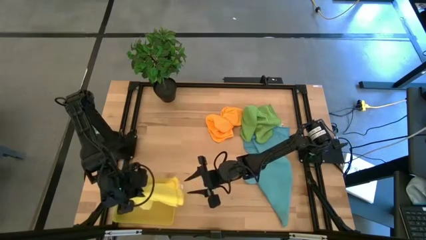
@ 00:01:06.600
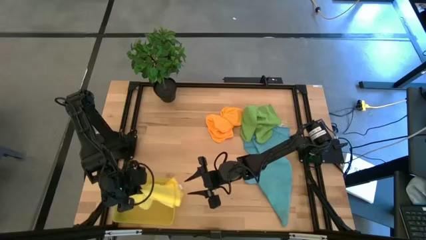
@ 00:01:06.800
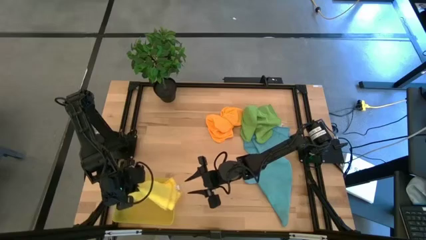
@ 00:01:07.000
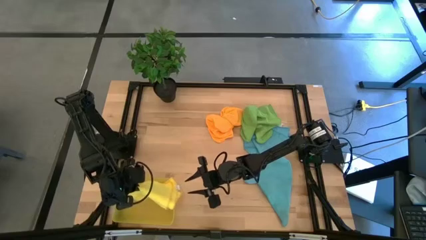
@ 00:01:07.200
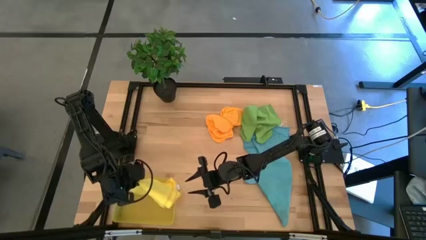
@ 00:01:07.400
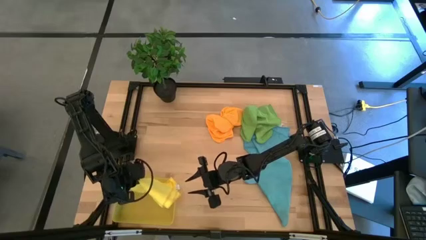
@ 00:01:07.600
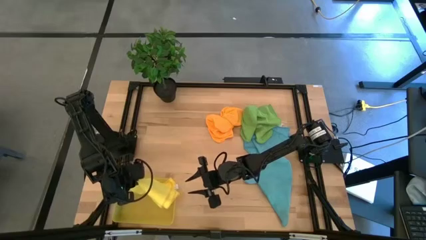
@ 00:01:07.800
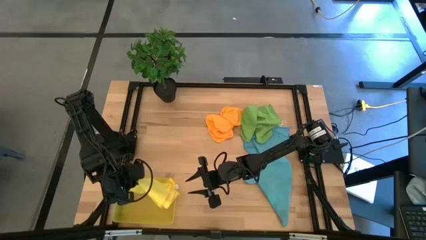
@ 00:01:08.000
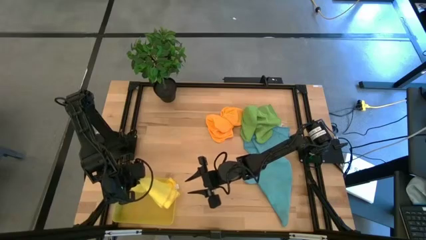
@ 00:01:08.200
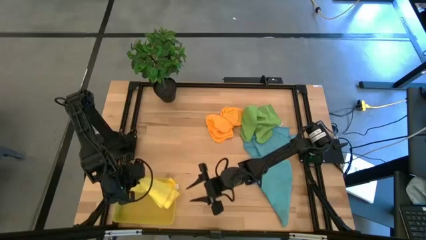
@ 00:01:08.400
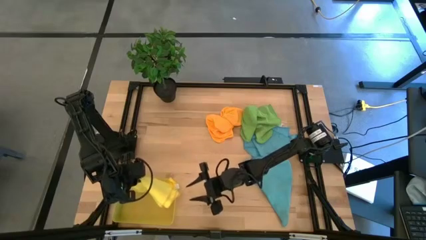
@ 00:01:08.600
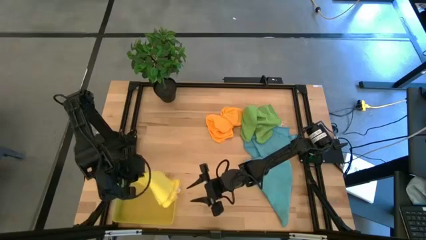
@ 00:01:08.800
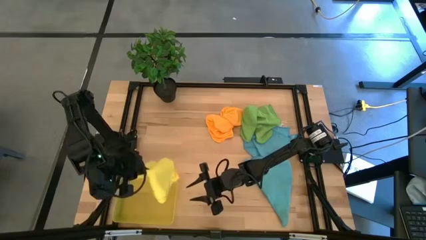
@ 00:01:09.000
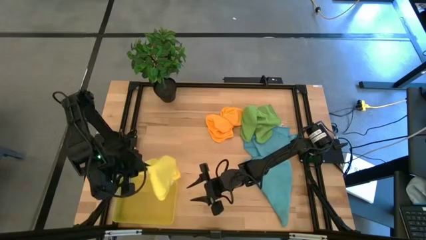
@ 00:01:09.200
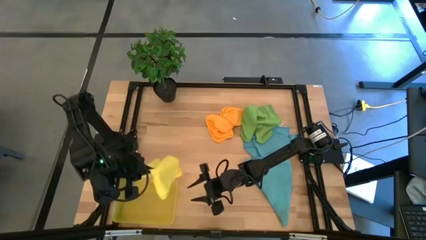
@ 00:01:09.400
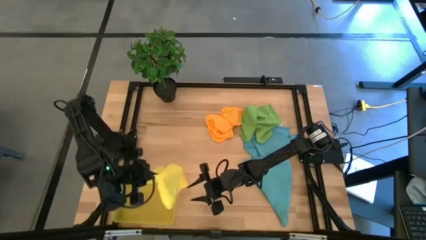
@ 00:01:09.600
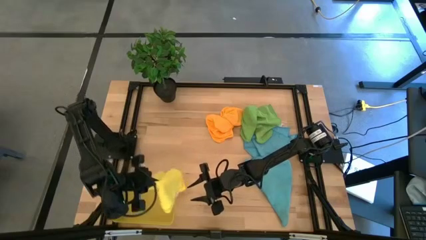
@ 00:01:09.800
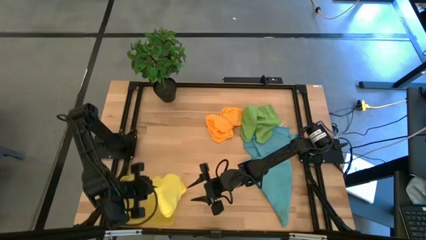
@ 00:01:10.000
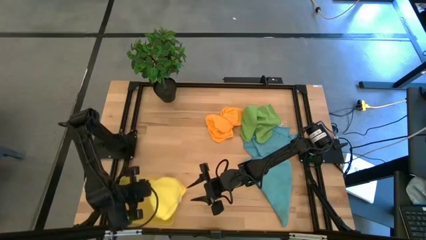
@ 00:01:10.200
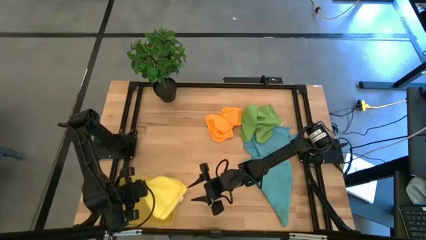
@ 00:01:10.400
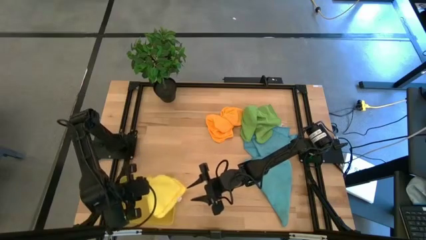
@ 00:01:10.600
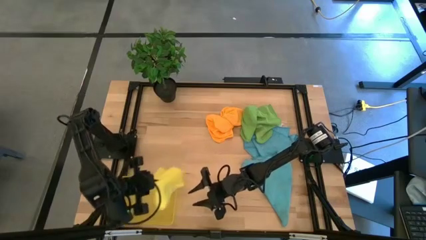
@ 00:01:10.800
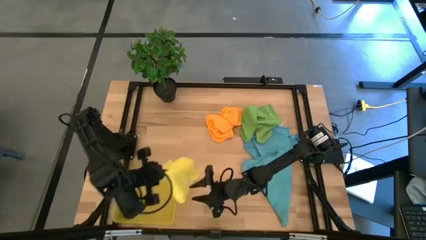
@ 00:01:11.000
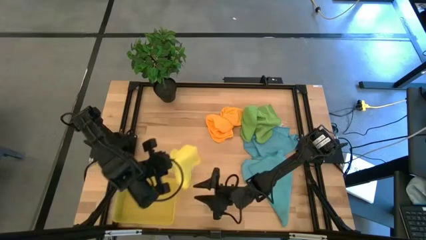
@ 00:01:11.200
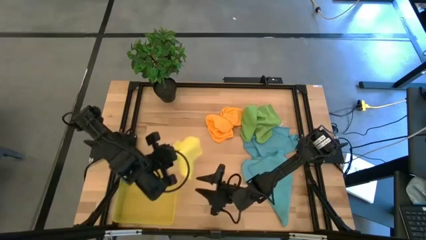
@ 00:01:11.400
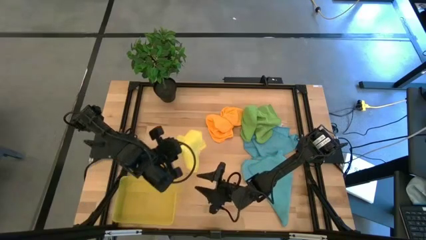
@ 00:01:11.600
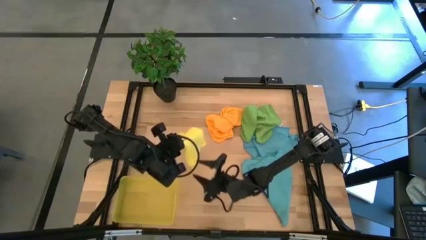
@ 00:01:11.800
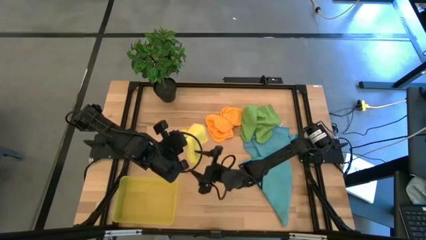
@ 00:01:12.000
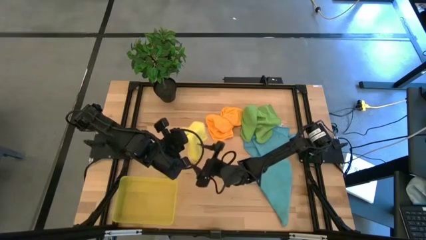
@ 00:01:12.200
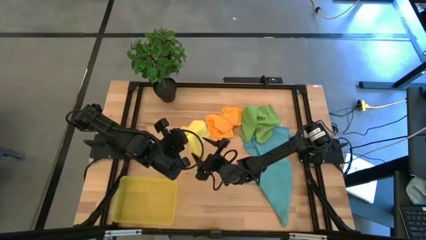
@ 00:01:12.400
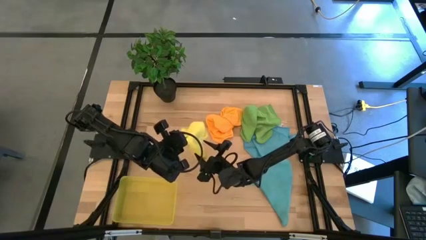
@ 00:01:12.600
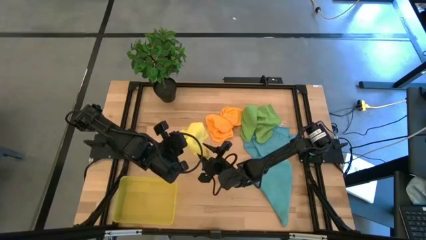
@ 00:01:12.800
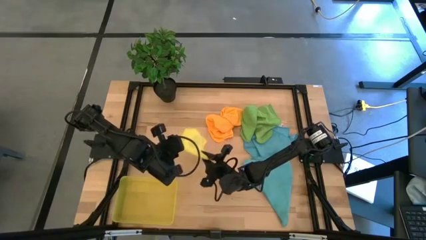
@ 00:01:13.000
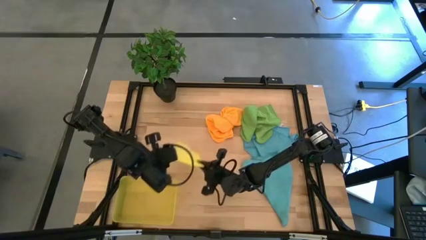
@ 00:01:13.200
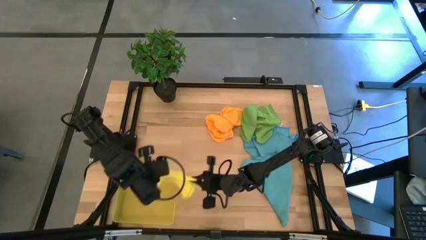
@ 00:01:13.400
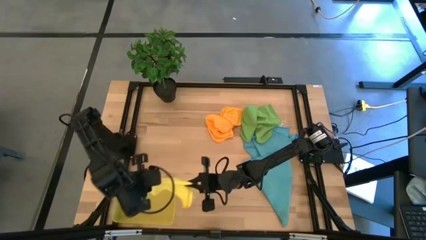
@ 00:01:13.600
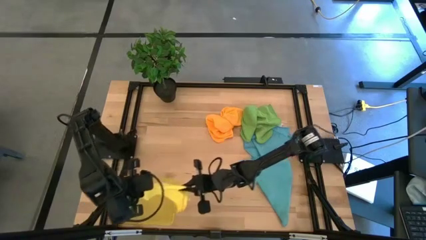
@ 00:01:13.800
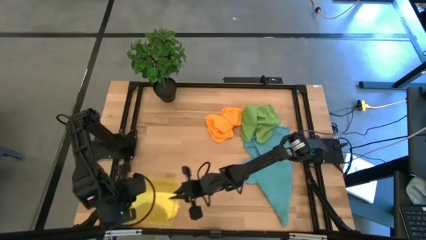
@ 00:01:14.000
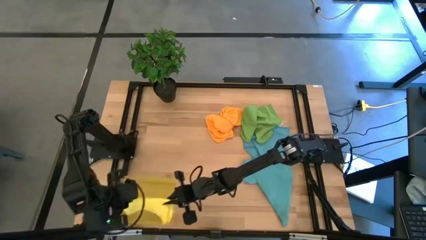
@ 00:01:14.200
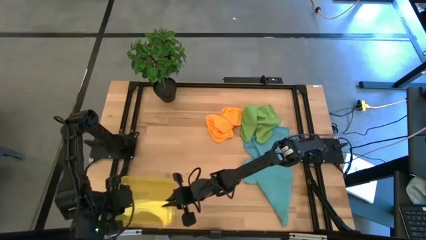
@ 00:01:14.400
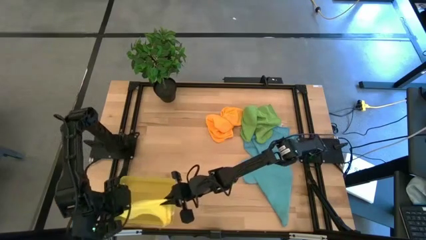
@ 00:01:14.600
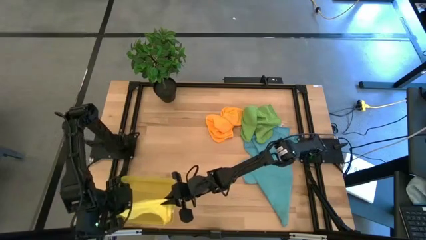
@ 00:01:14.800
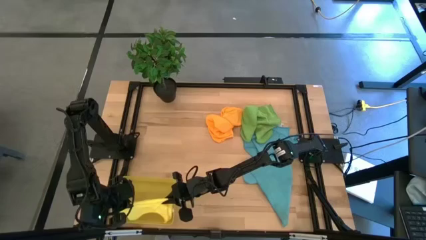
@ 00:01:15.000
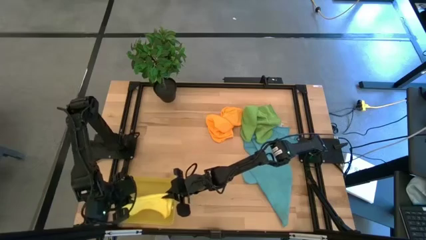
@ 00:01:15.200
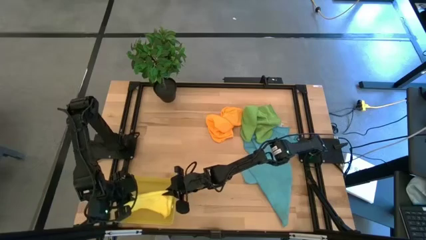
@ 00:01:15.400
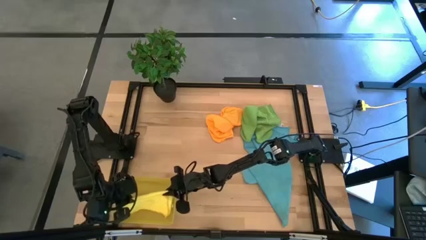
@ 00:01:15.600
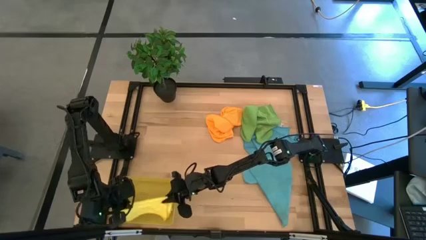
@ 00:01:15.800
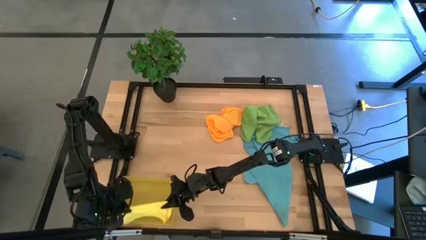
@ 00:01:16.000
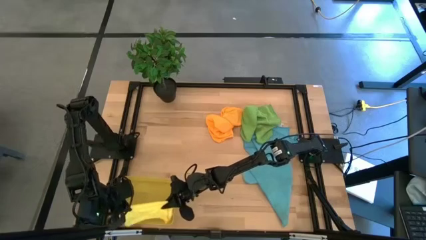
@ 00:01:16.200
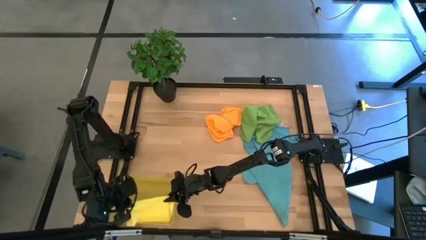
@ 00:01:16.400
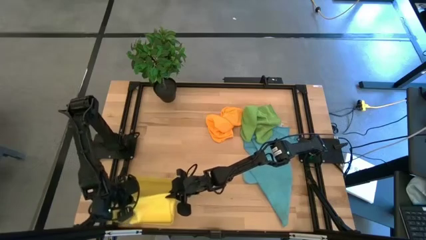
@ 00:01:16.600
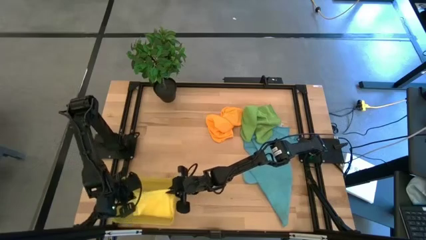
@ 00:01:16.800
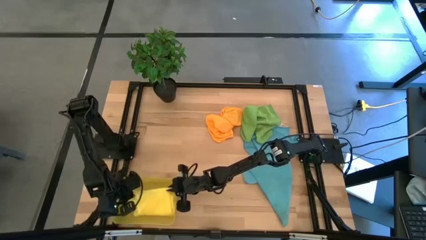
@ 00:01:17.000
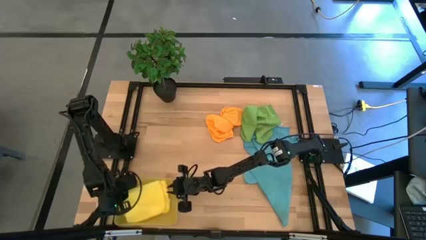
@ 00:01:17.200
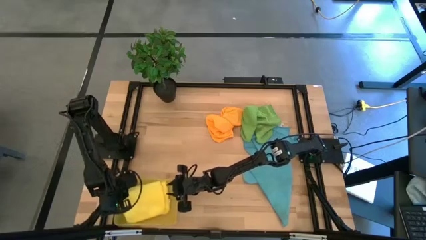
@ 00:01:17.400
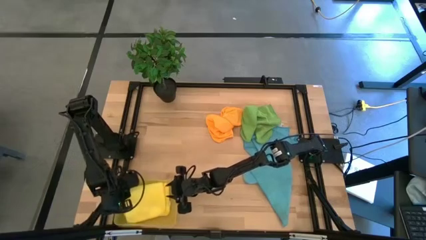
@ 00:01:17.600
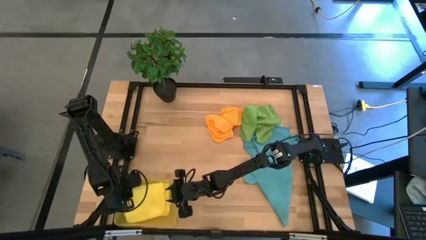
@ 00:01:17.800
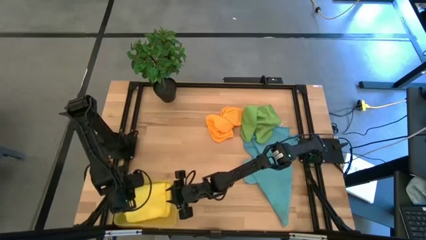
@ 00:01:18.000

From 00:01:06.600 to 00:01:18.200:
Task: Fold microfiber towels
Put the folded yellow microfiber cloth into the yellow bin
